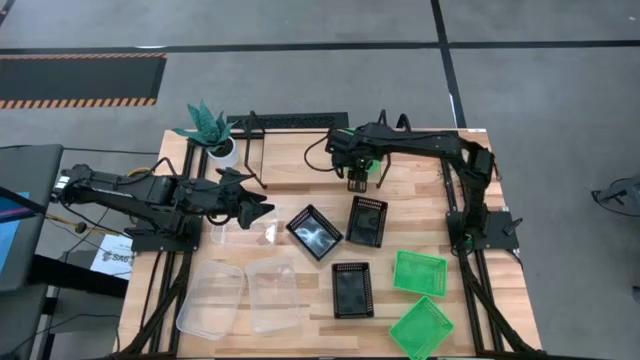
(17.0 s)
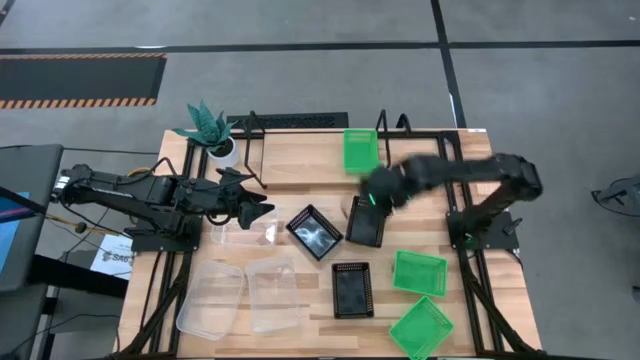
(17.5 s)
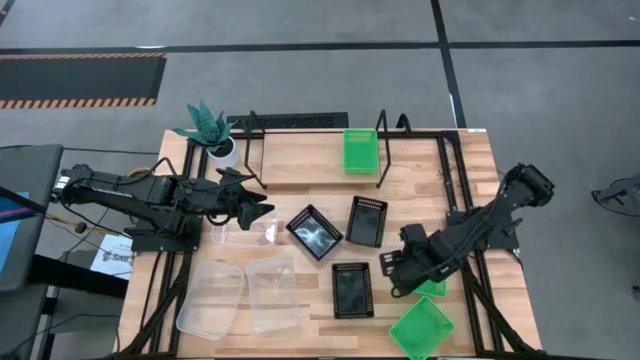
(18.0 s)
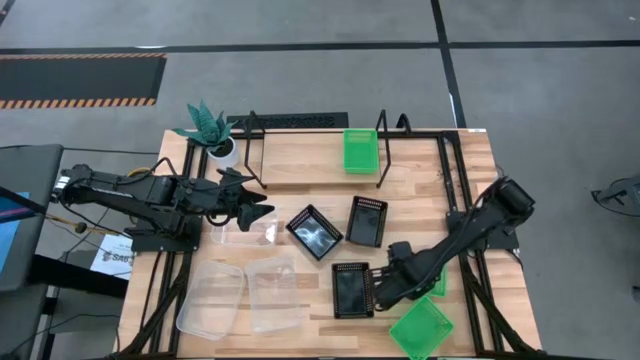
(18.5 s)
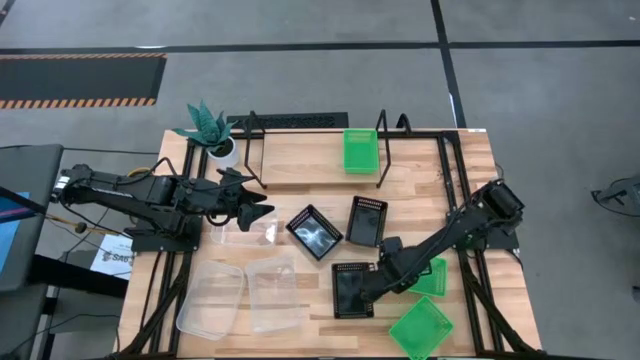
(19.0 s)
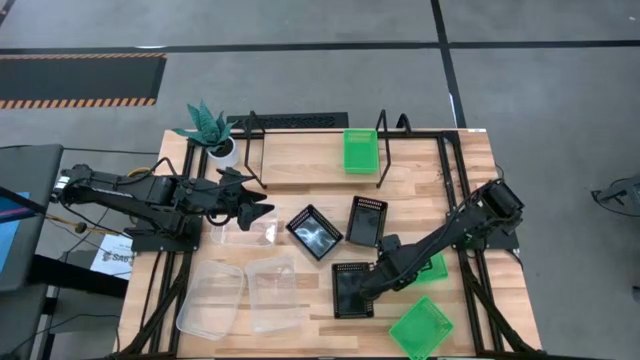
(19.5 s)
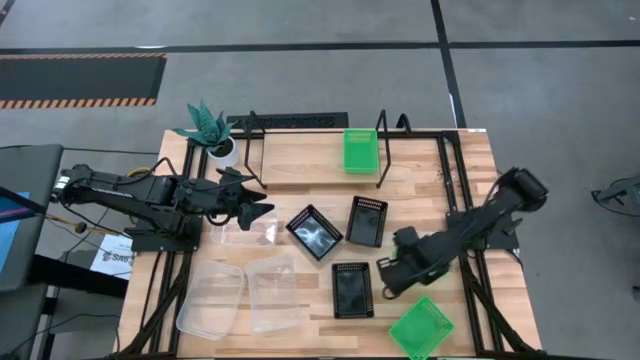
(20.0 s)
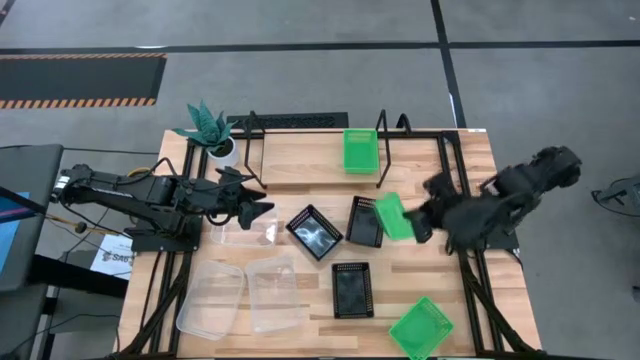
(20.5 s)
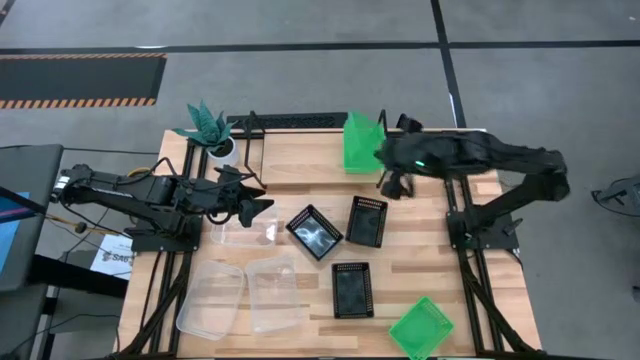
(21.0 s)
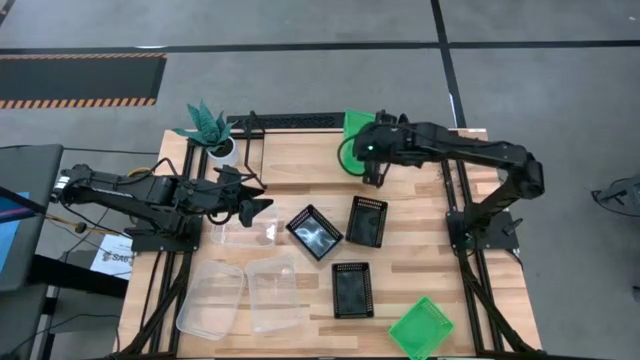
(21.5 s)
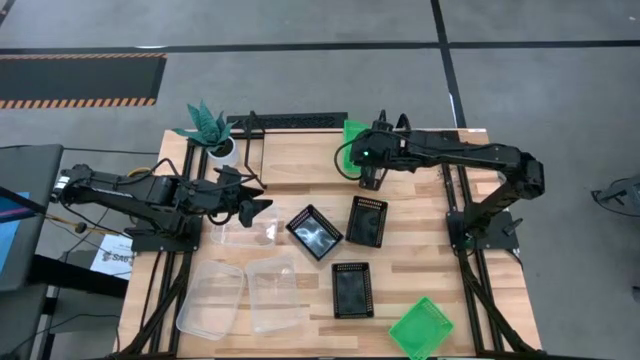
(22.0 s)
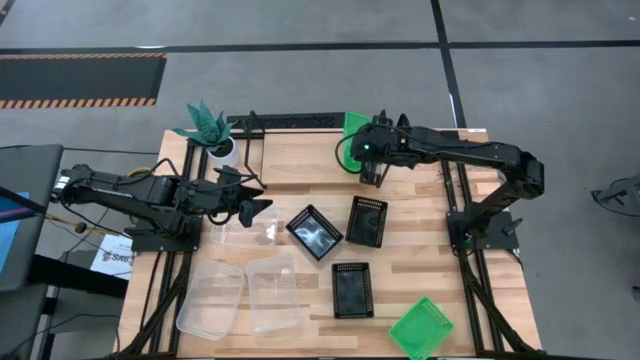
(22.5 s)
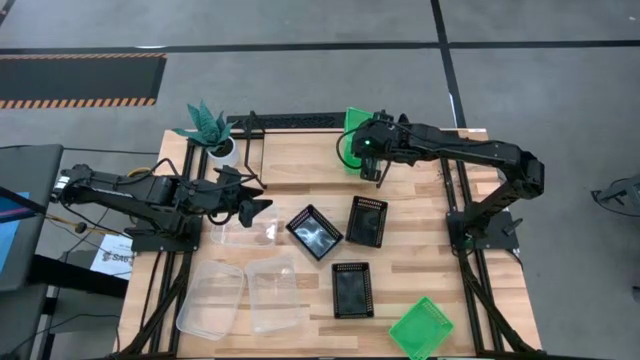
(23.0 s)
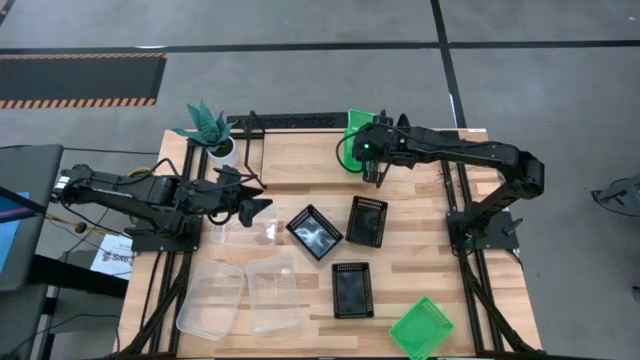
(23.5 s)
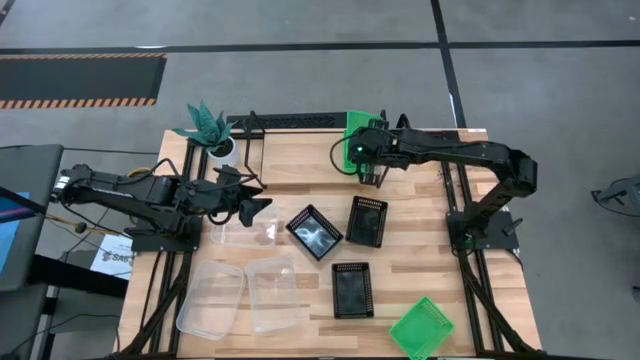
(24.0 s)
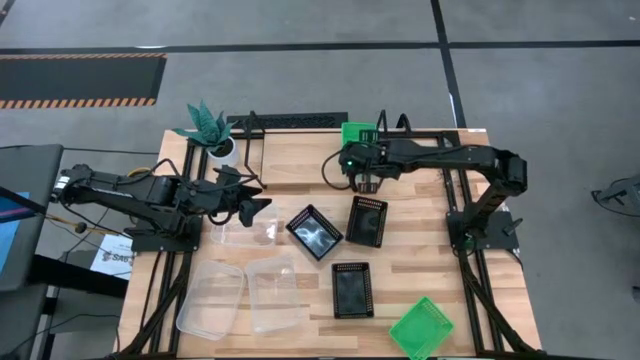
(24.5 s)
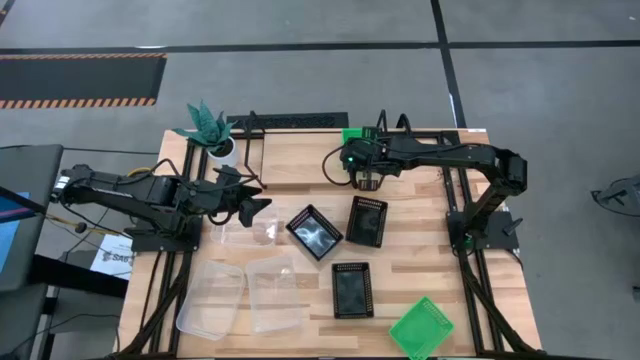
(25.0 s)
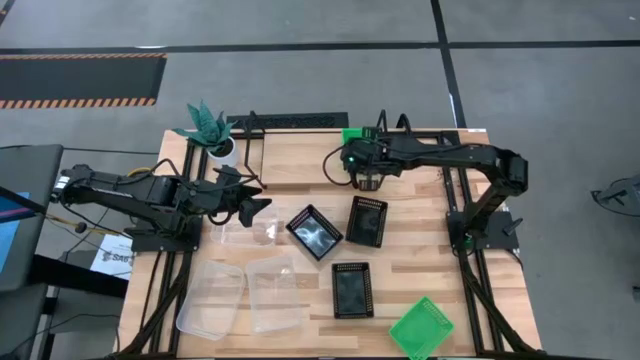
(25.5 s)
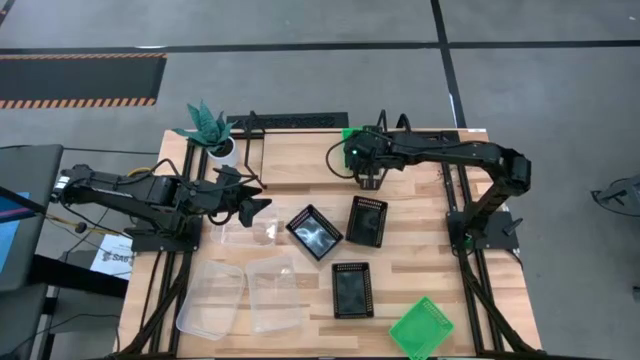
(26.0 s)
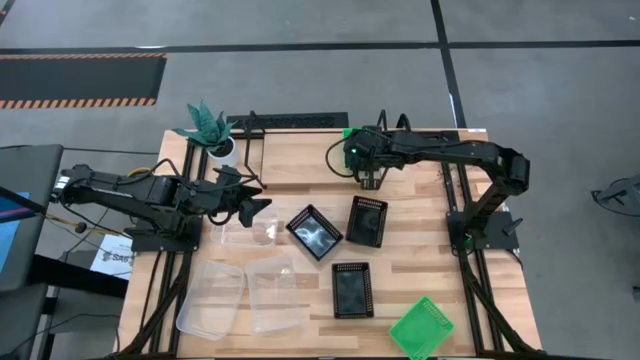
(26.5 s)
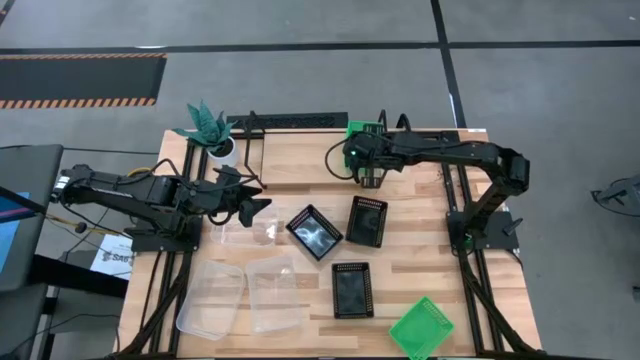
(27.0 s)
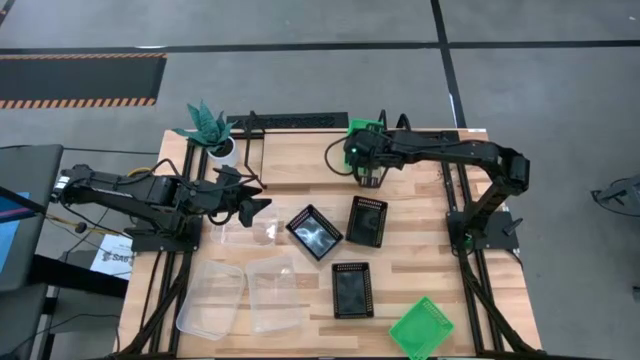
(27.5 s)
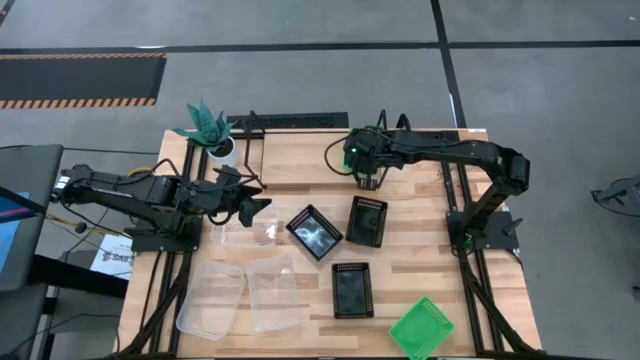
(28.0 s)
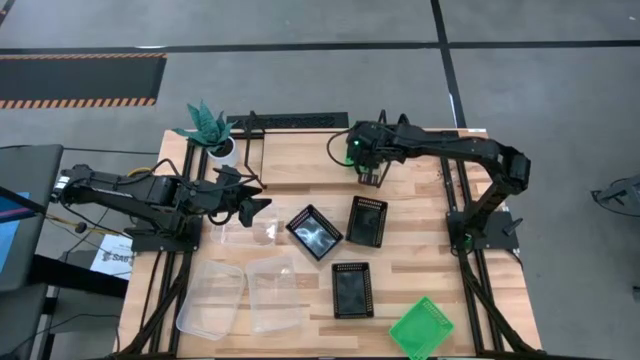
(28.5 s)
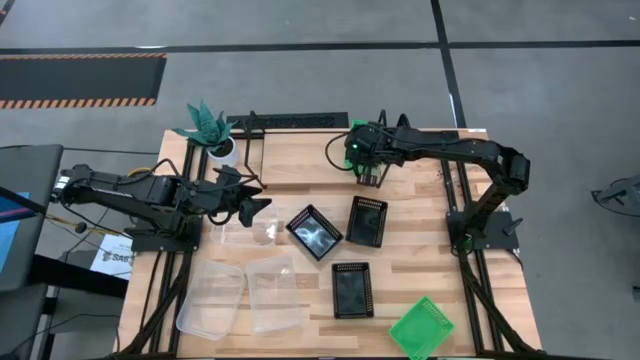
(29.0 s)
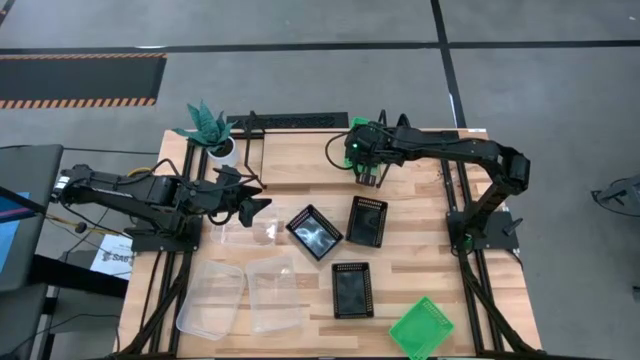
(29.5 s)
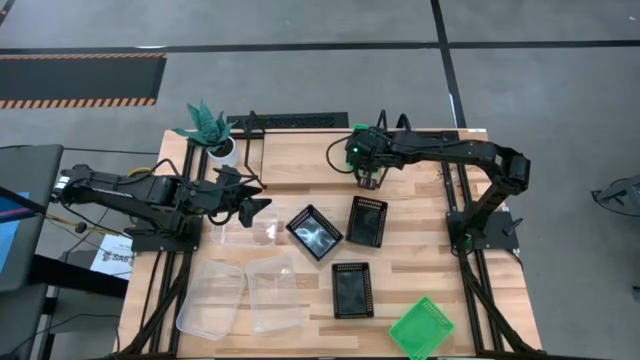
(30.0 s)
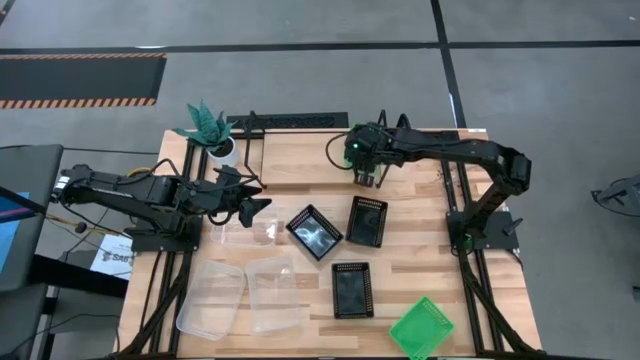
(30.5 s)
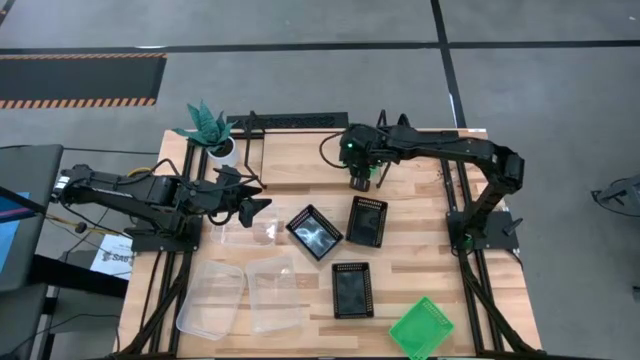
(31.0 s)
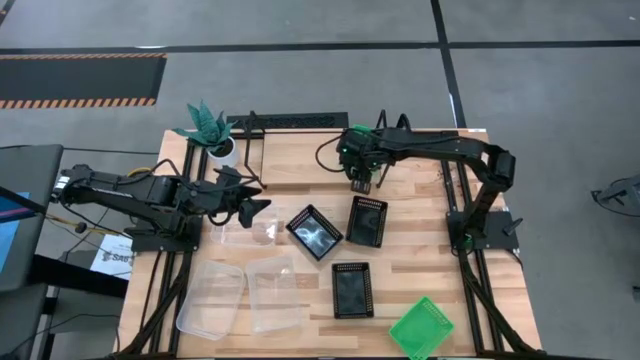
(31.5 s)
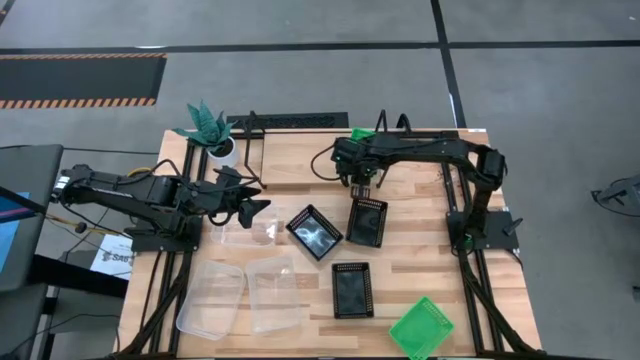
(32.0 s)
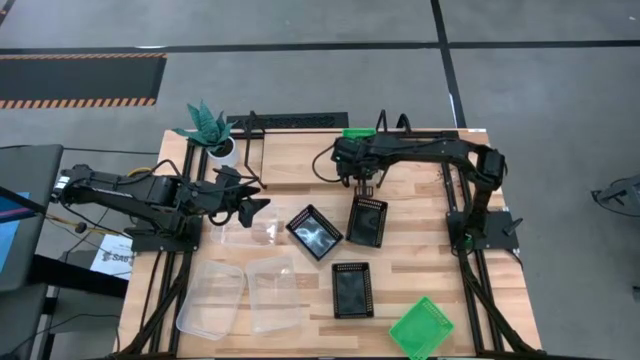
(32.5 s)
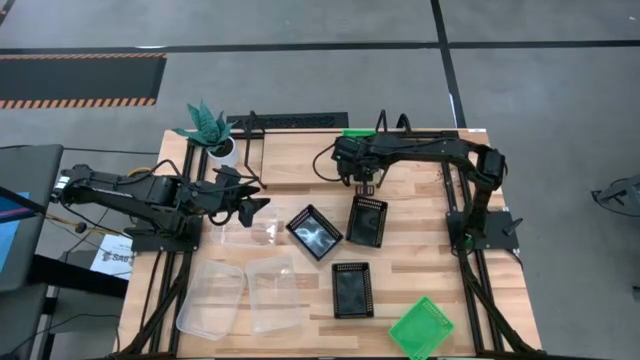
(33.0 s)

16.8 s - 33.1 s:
Task: Stack baskets on shelf by color
Stack the top green bin on top of the green bin on the shelf
